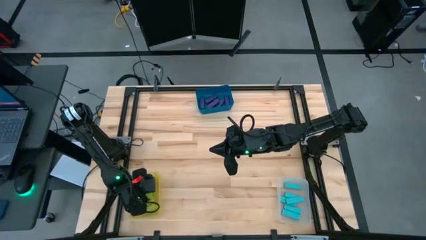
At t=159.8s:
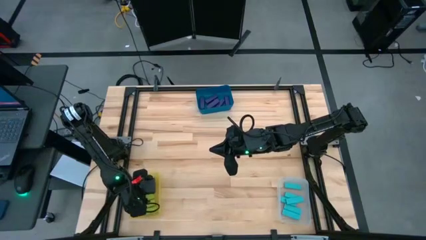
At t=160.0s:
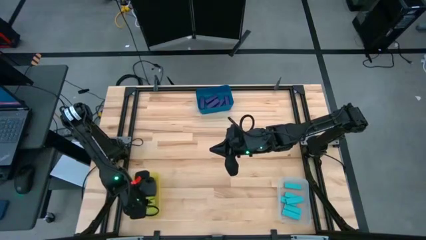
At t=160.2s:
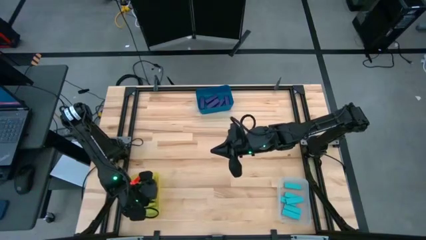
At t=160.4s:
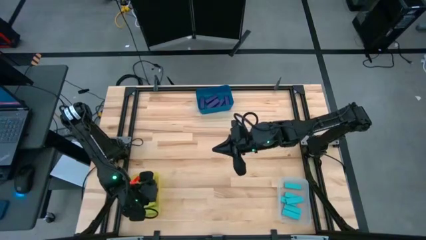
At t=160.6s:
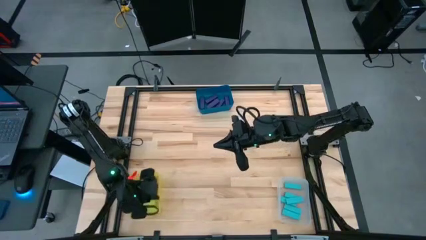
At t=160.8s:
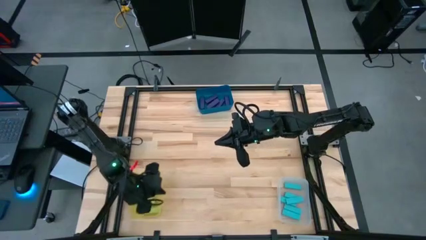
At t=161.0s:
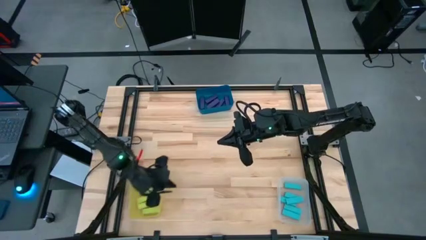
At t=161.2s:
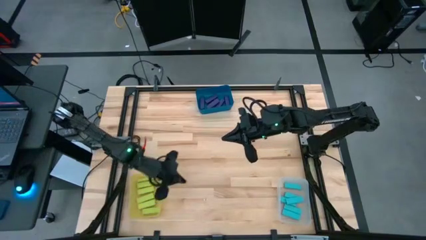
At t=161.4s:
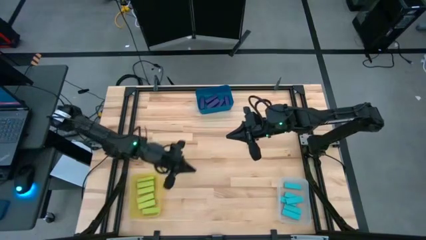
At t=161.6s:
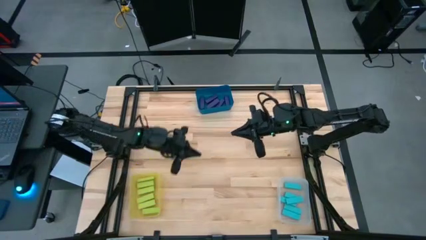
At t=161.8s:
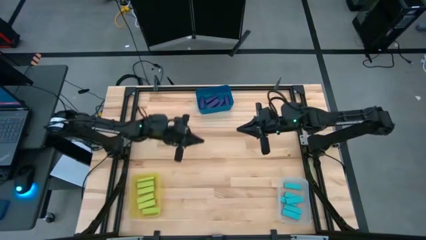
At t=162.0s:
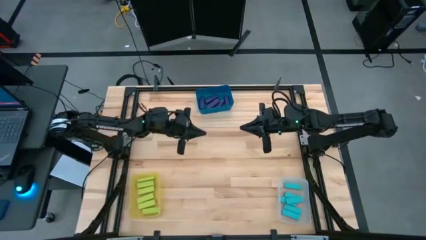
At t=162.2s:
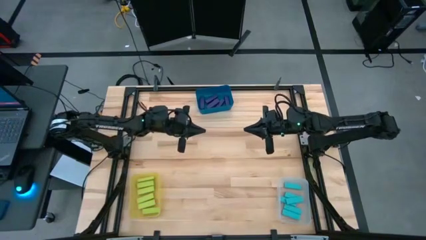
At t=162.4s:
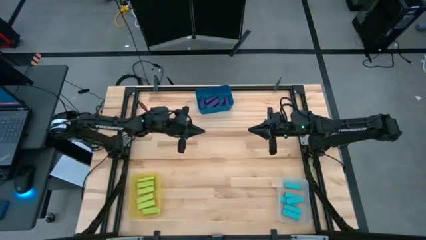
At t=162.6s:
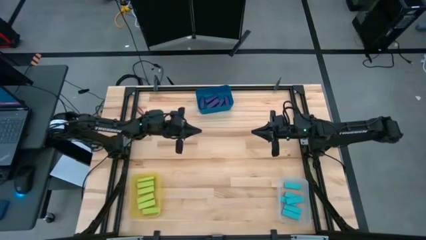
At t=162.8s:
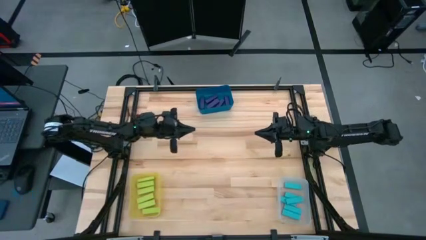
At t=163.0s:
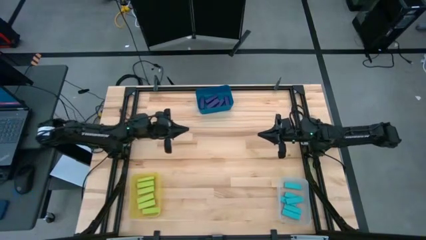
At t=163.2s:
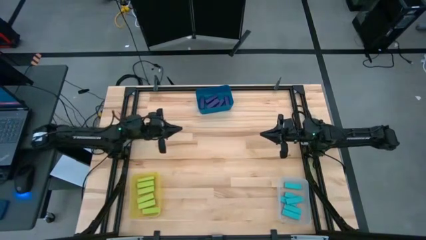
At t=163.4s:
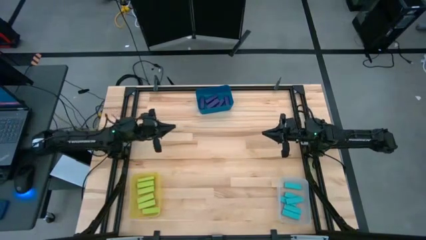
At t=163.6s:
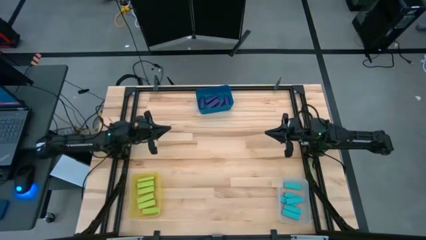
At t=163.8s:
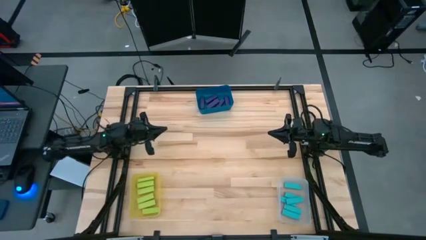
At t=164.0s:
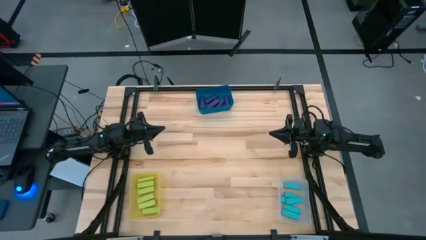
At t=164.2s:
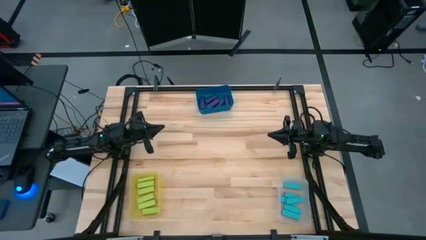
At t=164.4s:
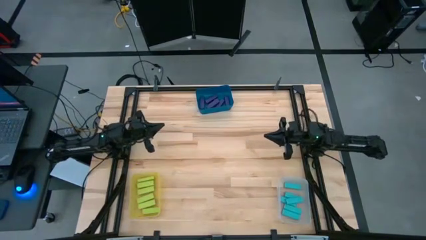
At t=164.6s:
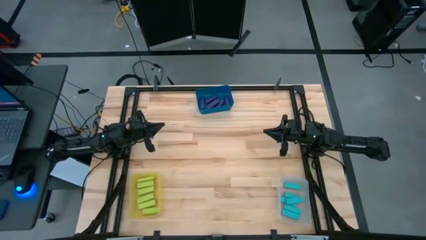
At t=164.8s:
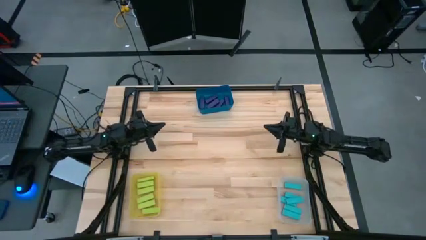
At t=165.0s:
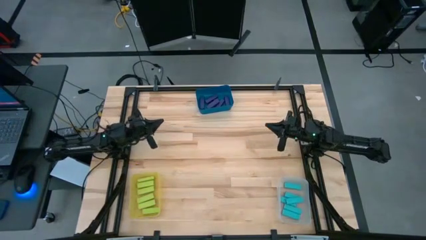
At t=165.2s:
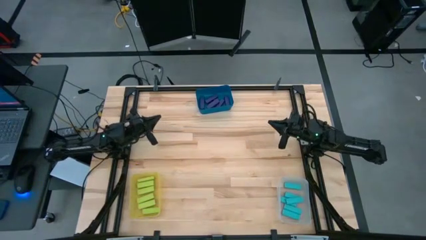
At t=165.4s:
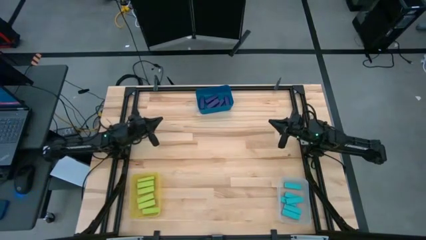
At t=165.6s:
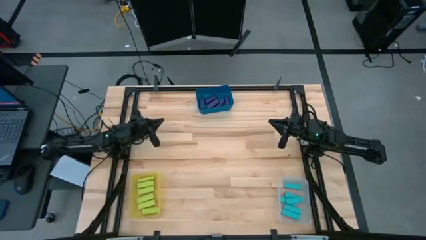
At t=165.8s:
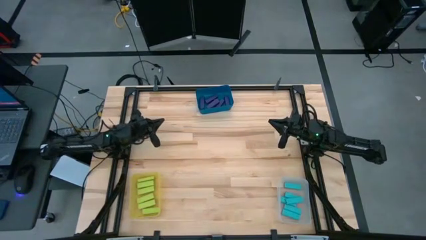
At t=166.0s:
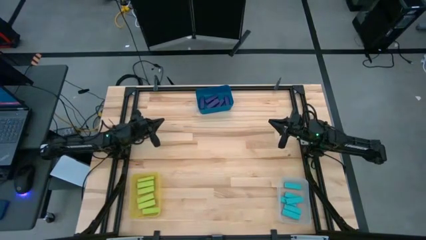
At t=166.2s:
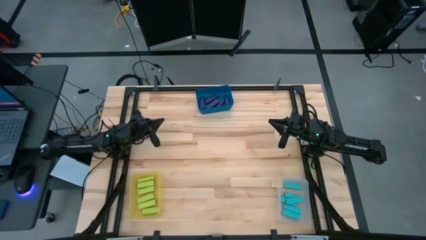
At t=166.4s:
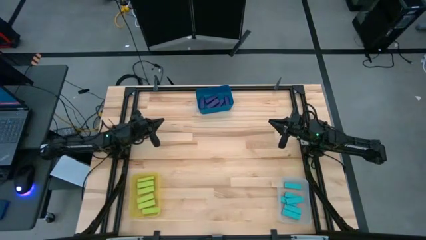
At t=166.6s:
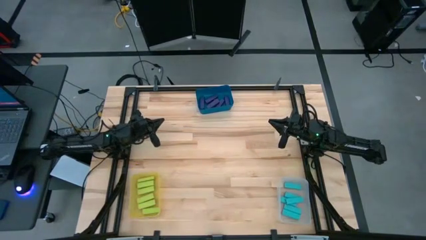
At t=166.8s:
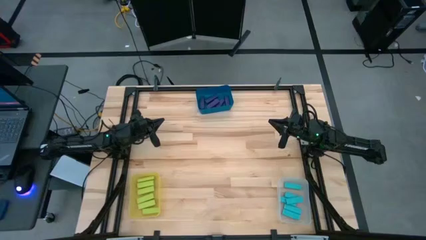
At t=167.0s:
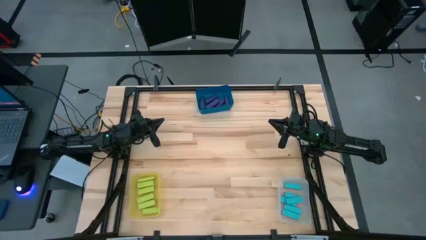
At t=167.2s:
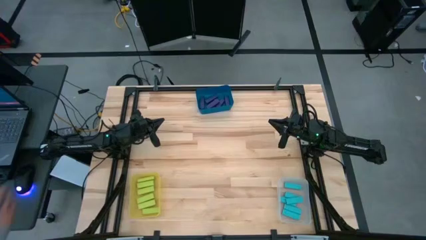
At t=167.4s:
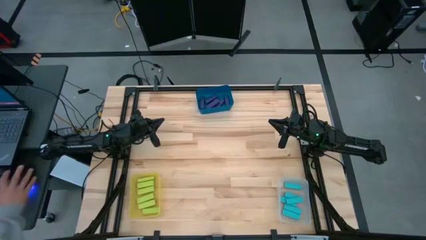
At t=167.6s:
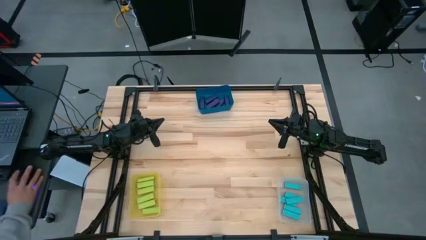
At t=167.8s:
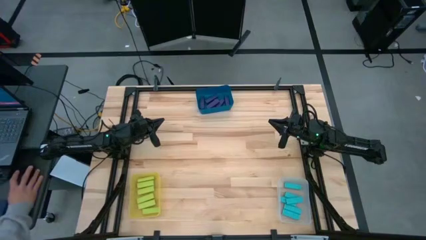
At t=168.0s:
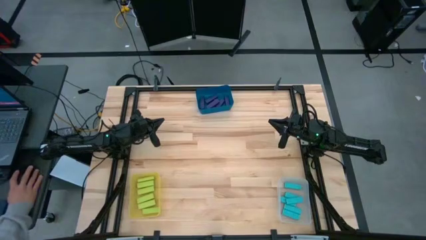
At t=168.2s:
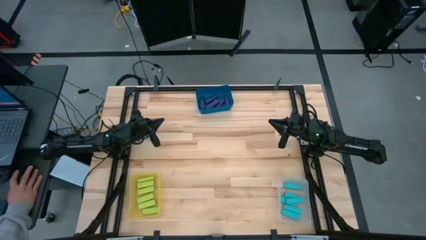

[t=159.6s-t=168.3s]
Task: Sort blocks
Return to Home Position

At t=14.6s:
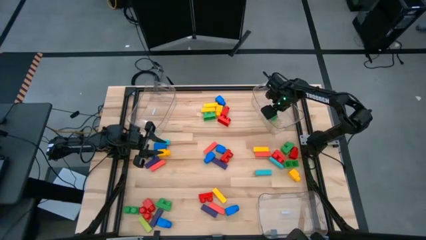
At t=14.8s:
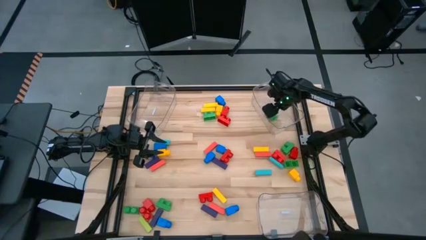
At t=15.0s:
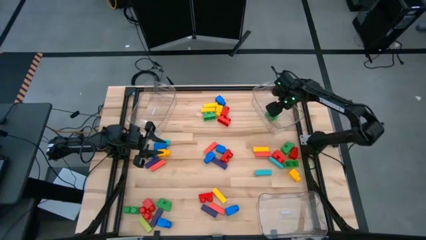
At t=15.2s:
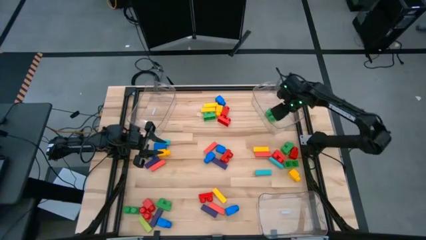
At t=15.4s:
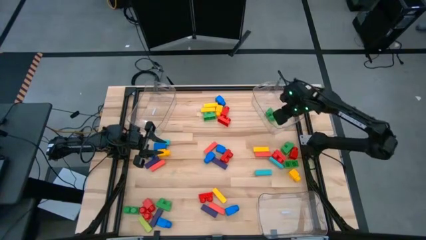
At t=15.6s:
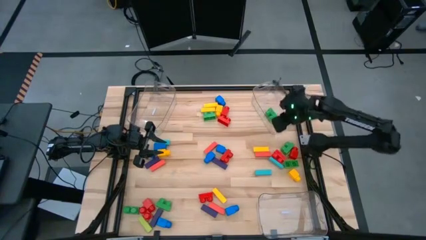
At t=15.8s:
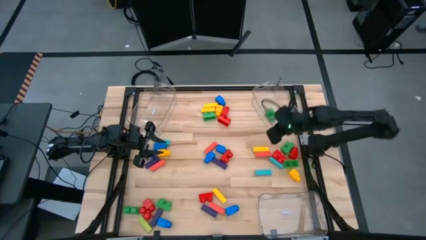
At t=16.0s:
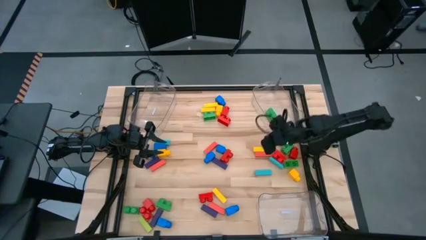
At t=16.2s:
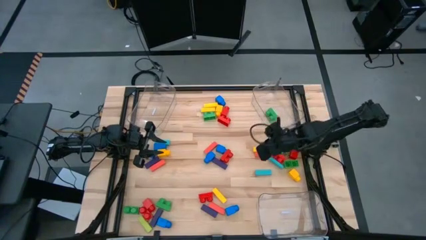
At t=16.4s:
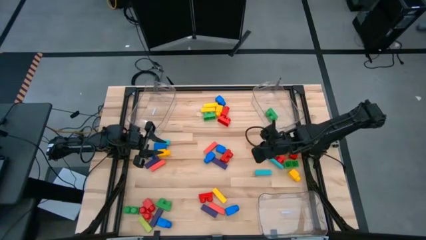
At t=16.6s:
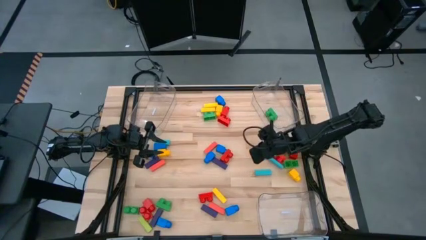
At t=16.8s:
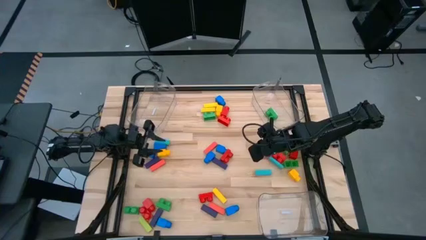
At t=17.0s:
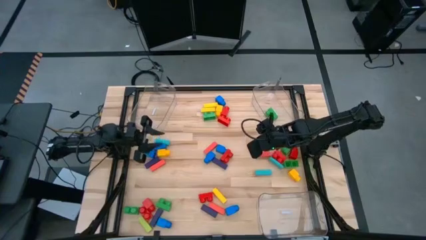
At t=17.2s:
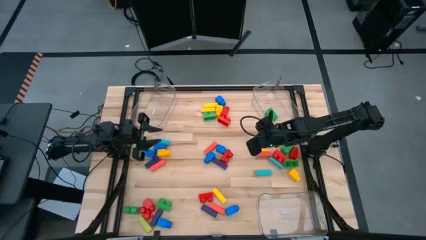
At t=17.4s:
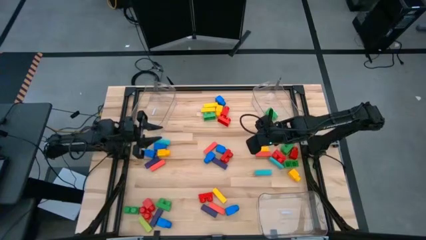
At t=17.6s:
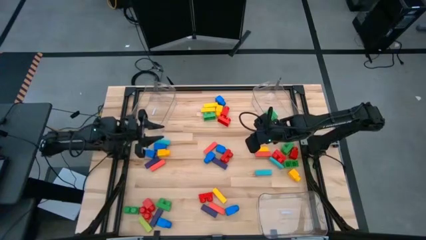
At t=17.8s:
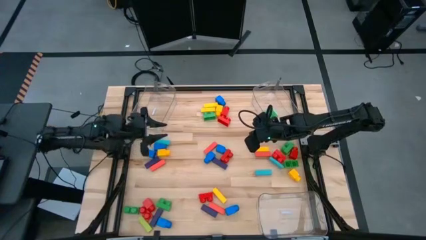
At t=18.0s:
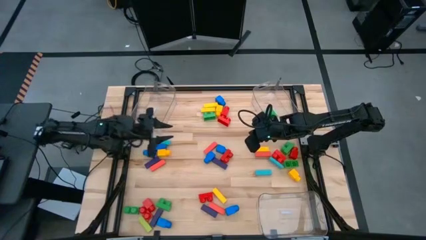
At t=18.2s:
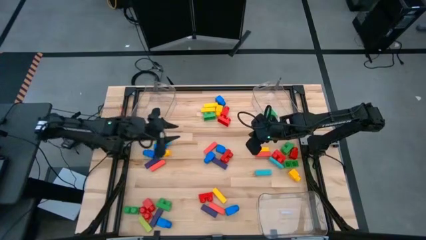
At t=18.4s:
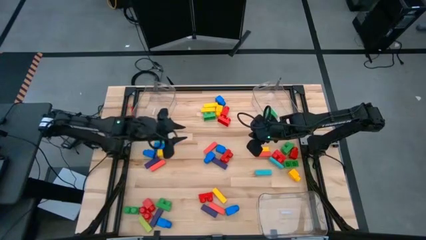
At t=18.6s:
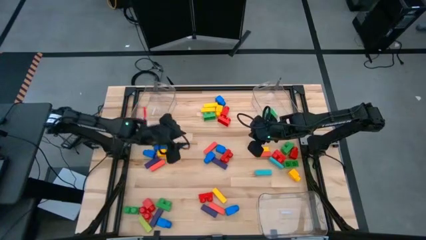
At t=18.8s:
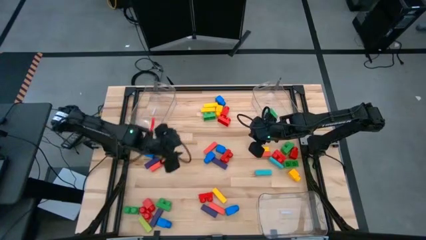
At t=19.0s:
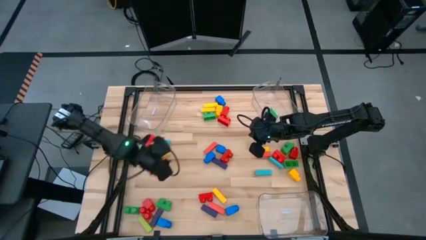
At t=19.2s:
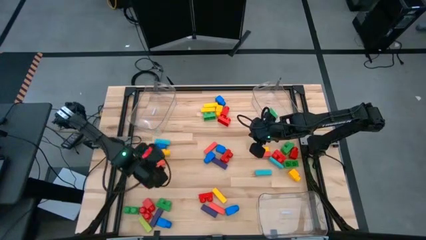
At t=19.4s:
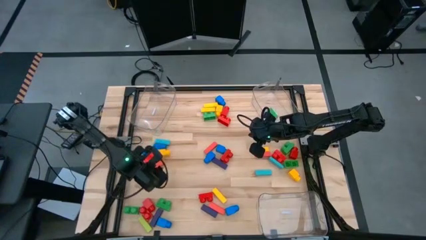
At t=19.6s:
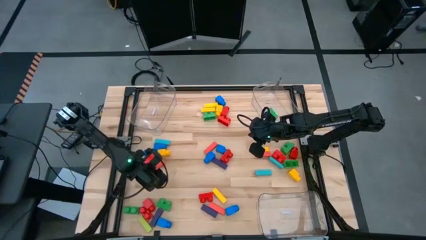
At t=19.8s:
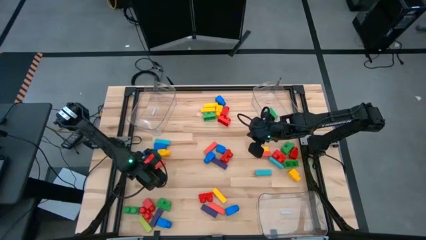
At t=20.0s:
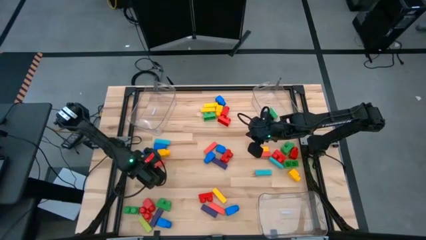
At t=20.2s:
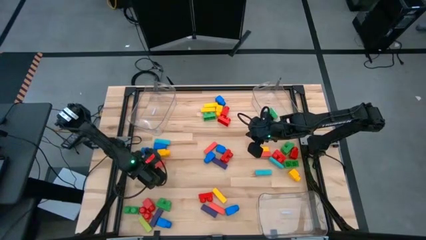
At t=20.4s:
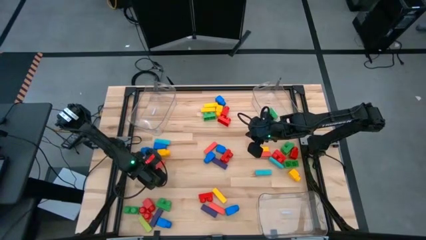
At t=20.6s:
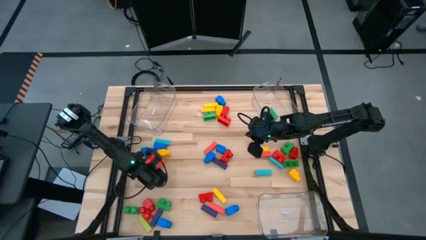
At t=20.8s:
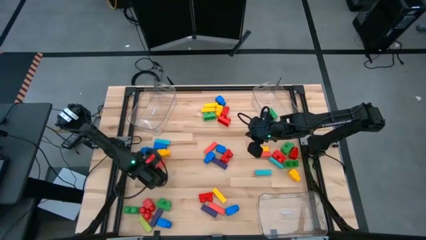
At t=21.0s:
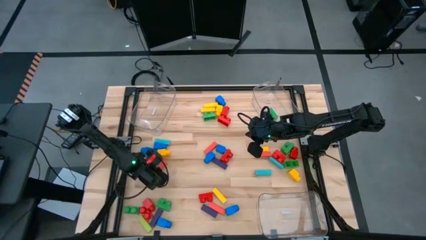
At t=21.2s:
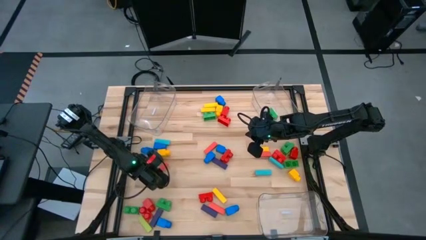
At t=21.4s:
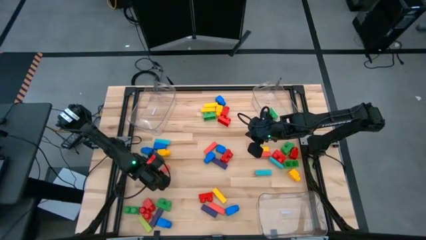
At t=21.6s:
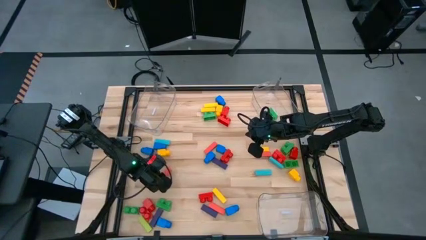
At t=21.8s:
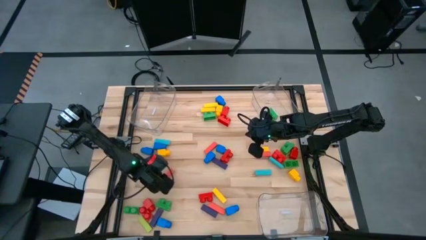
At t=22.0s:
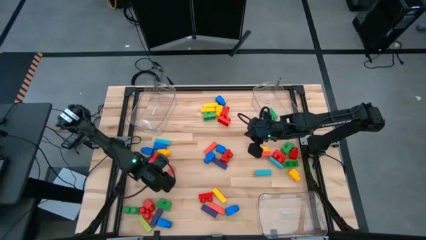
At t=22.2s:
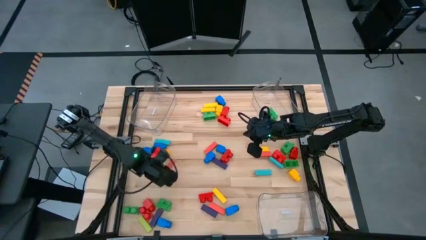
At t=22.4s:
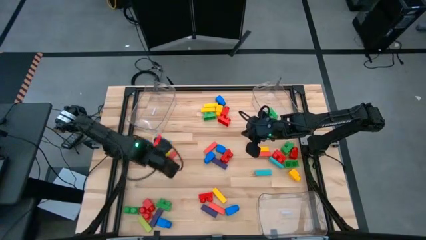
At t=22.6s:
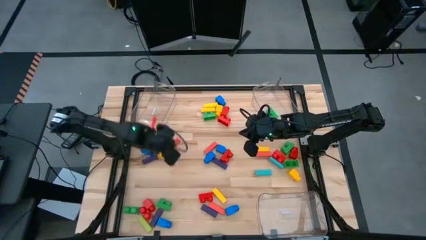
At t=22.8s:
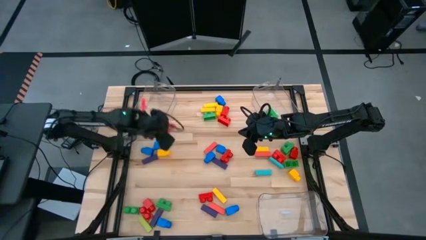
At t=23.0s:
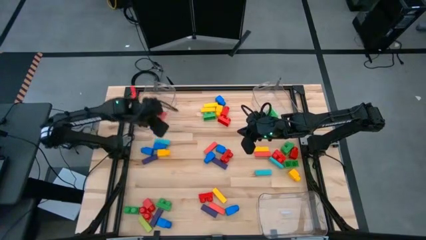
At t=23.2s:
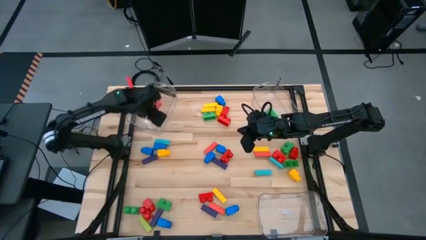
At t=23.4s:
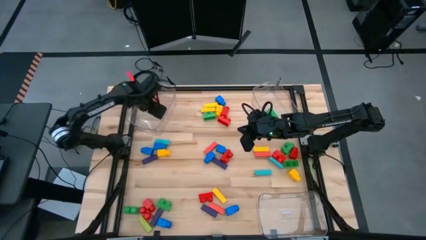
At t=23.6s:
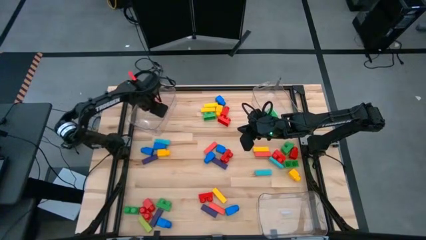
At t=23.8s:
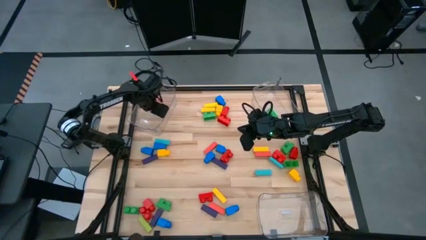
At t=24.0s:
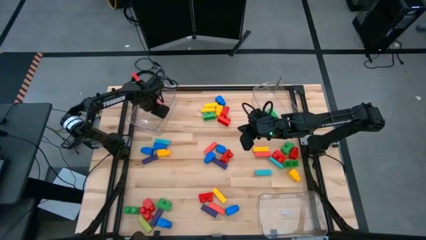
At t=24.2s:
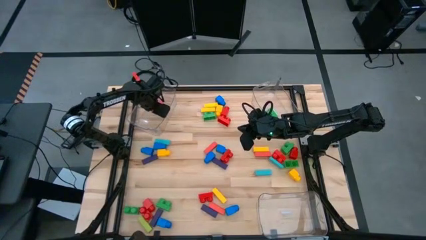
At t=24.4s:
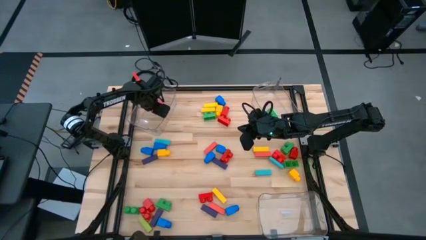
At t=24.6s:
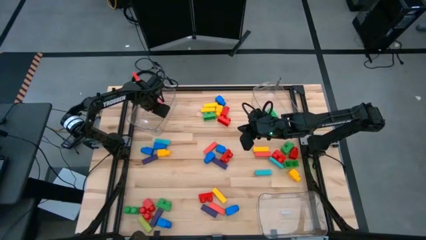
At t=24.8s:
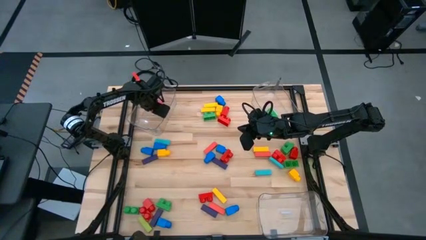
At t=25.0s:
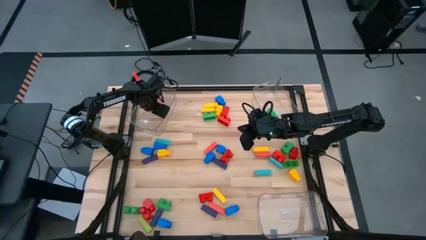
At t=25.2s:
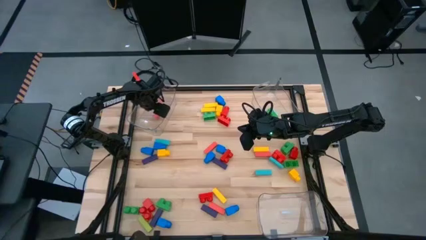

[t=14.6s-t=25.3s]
Task: Sort blocks by size
Put the orange block into the top left transparent bin
